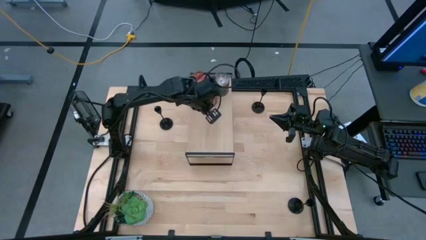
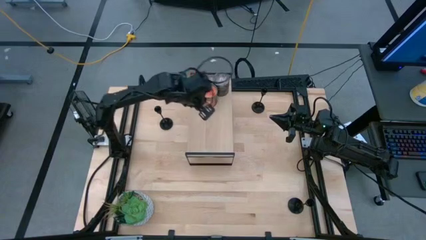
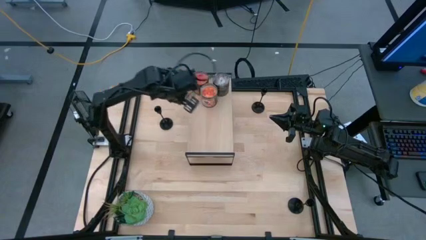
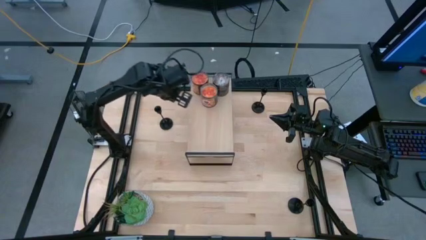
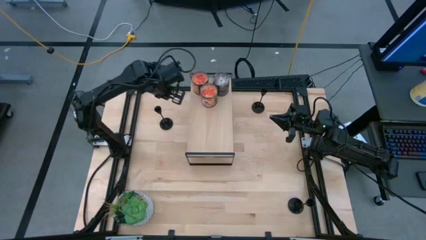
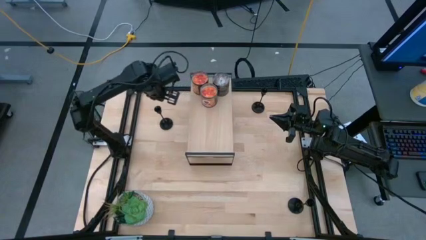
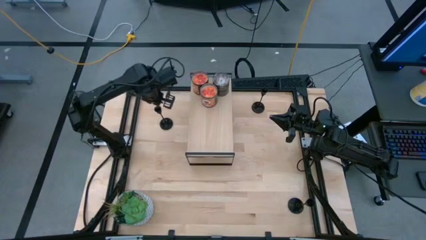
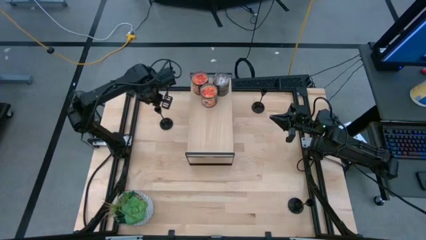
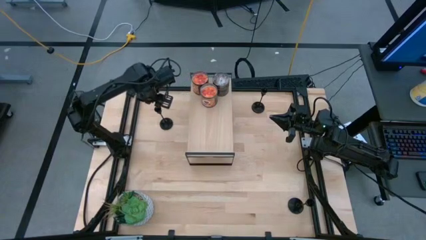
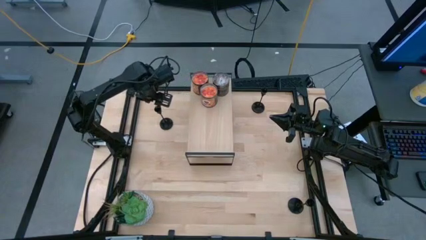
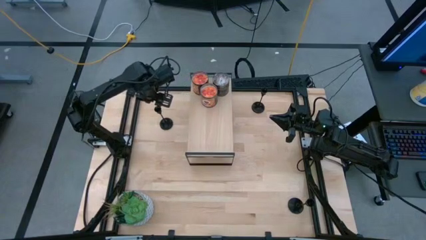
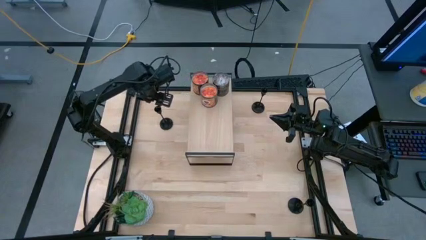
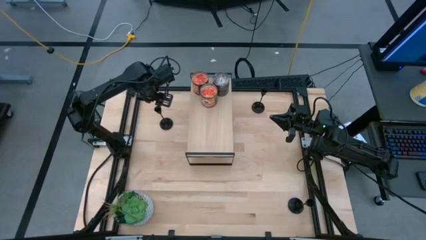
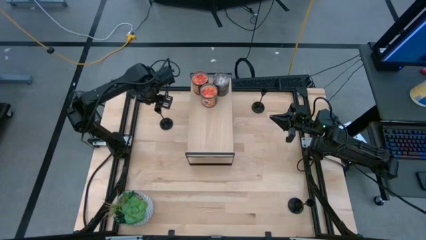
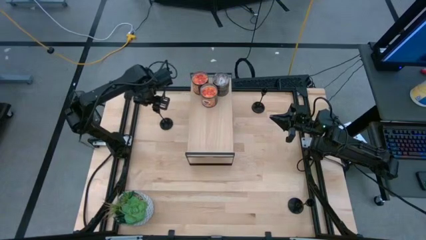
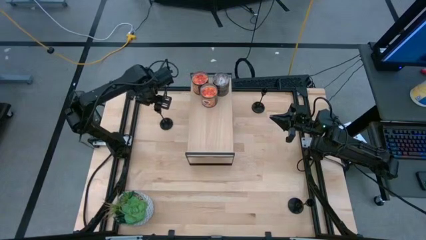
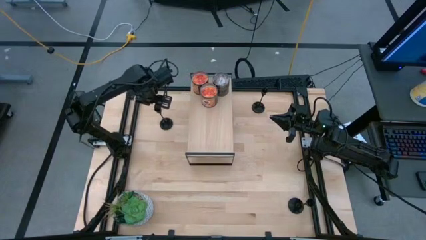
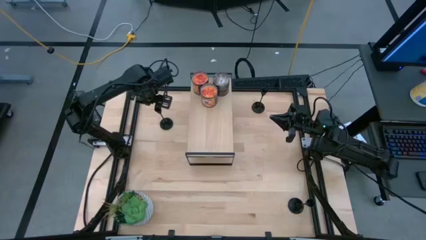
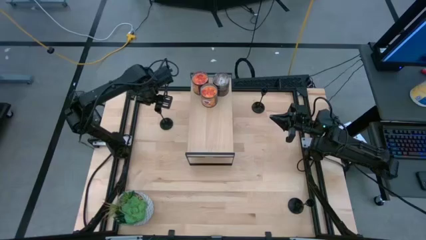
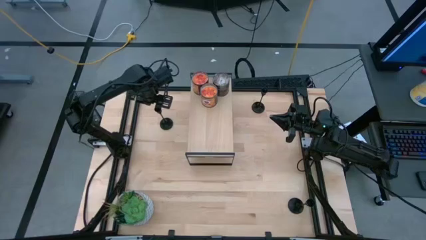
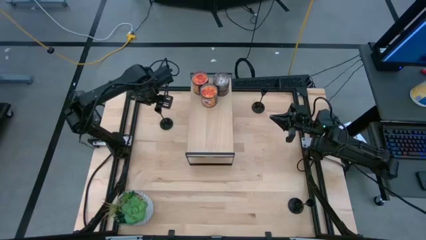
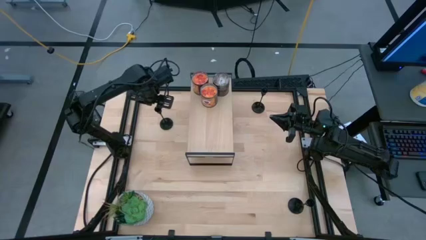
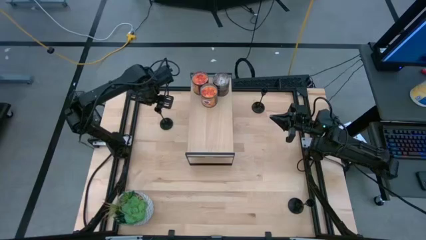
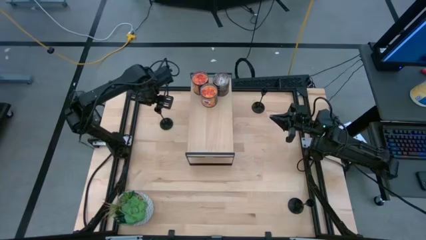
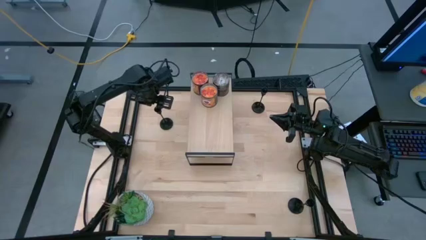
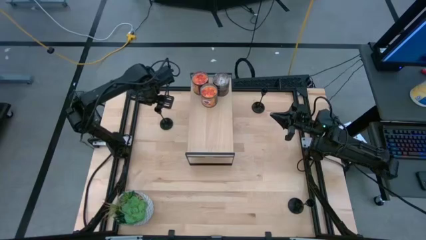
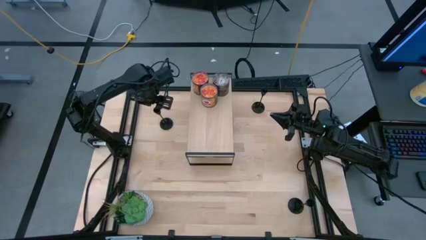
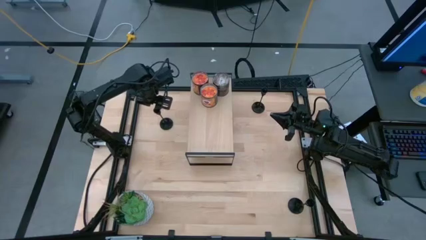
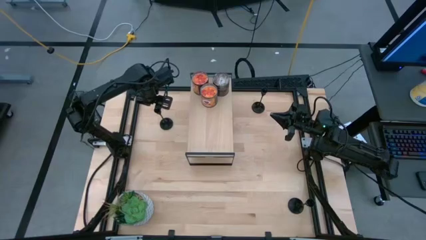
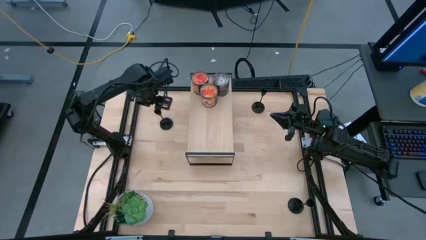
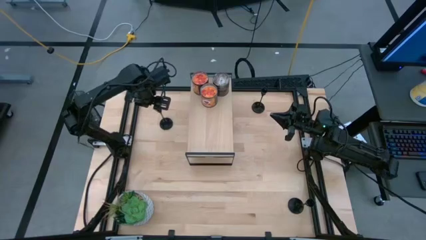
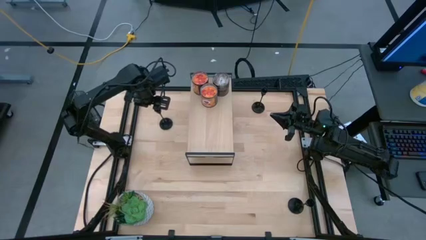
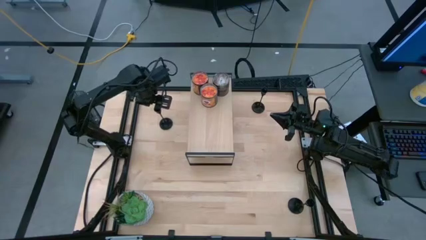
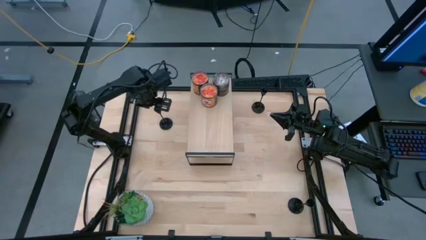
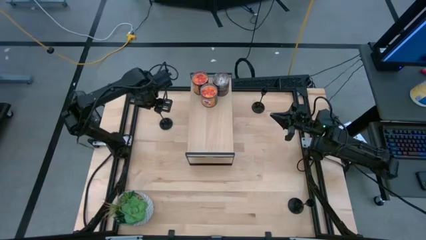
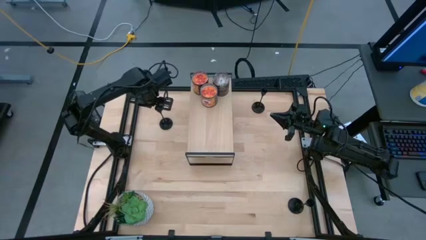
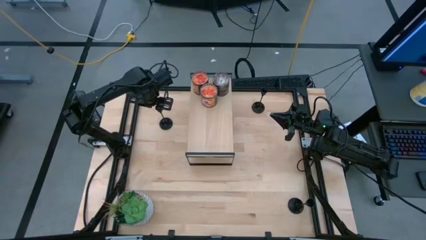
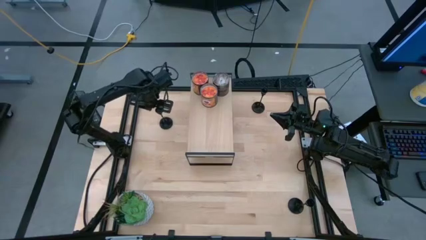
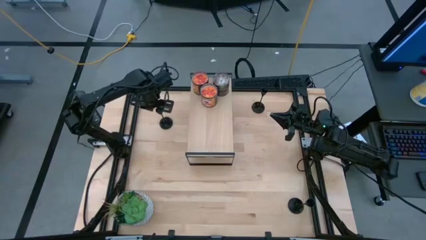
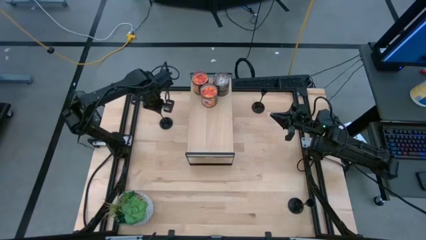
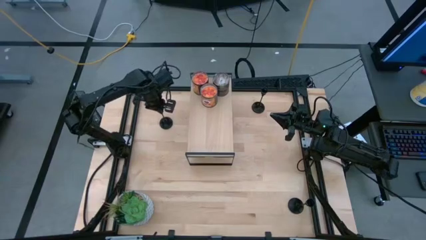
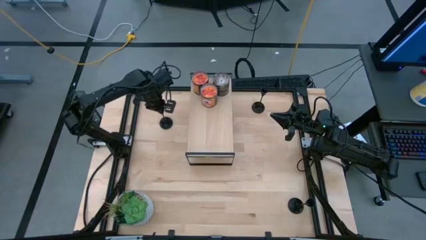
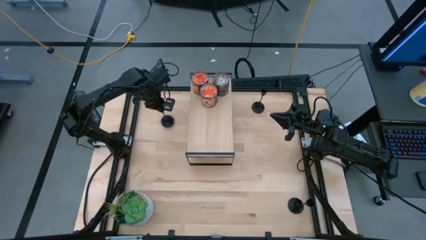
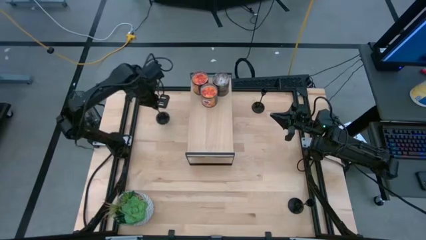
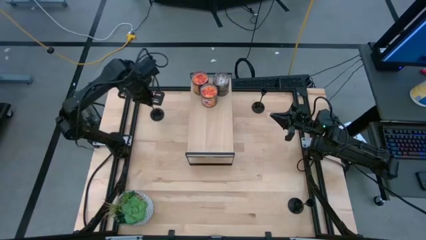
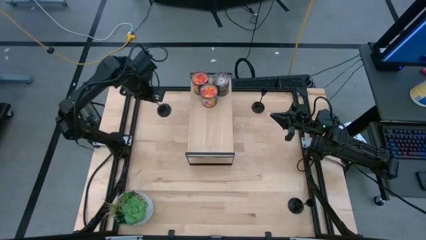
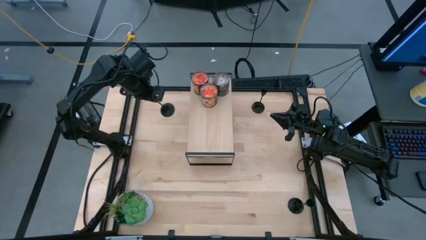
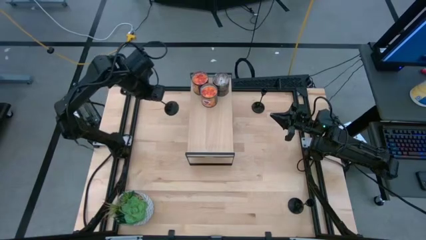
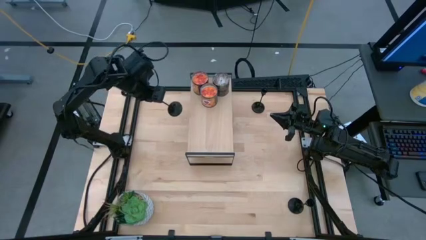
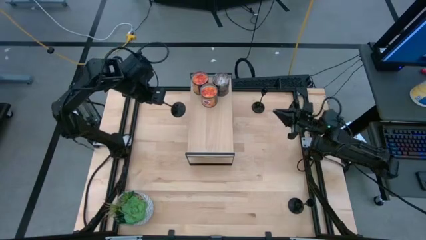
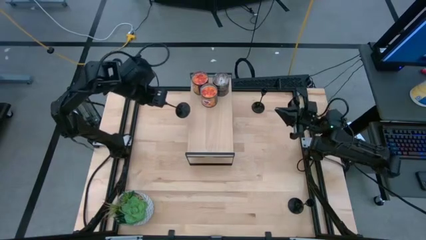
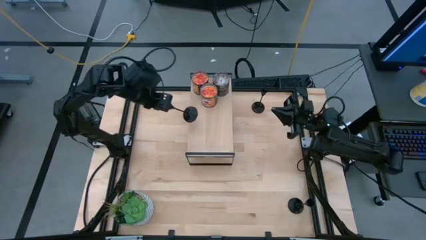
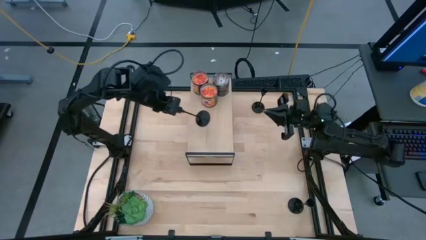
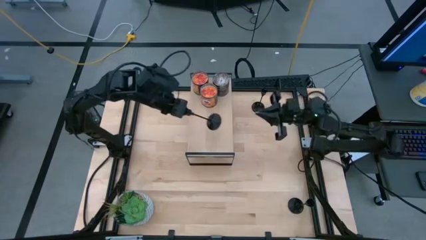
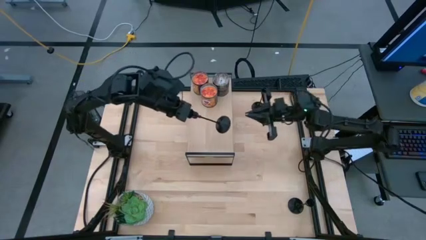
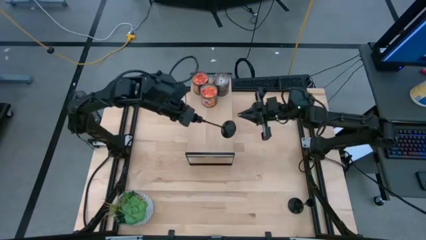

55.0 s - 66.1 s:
Task: Pick & Place candle stick holders
Put the left black candle holder on the shelf

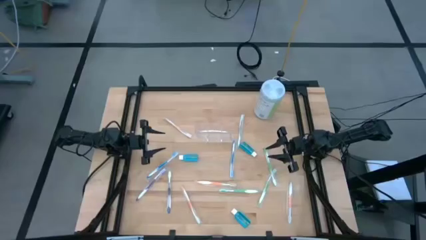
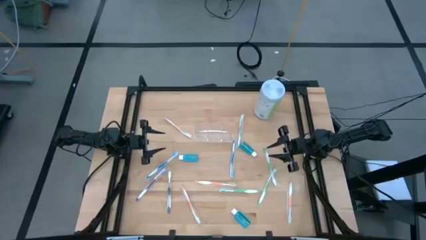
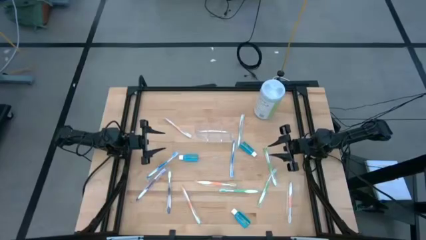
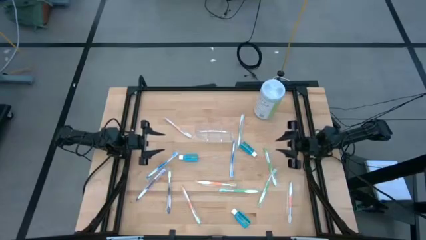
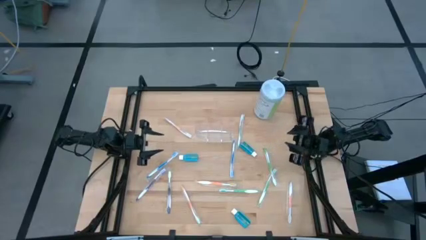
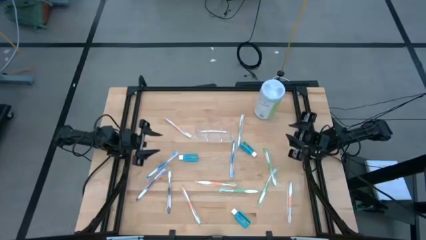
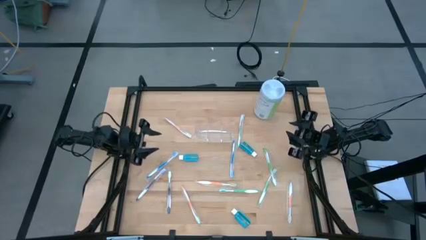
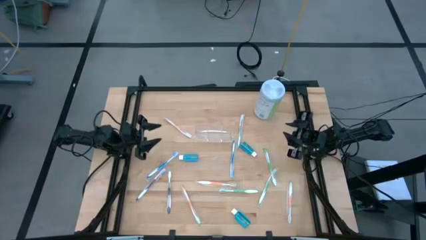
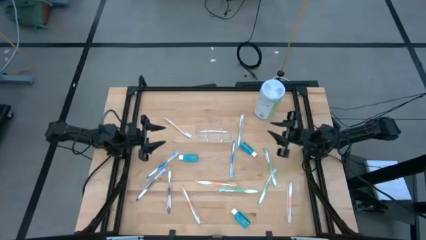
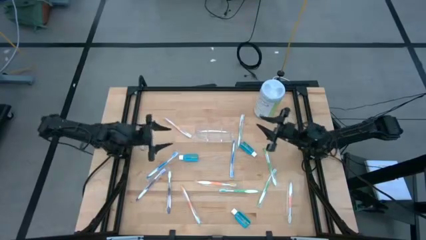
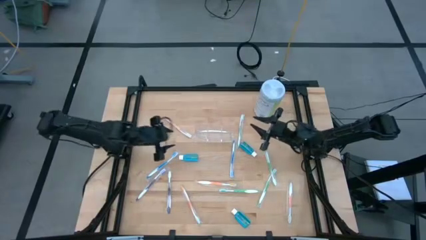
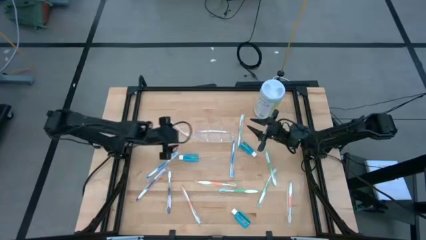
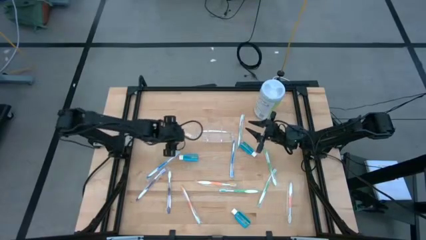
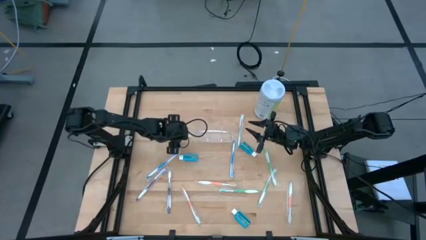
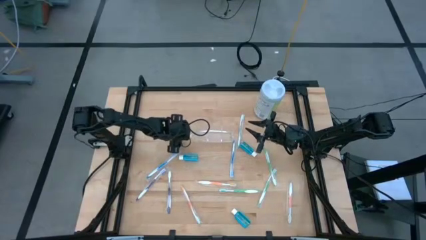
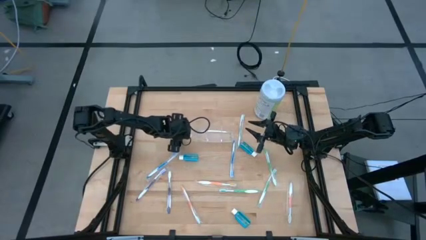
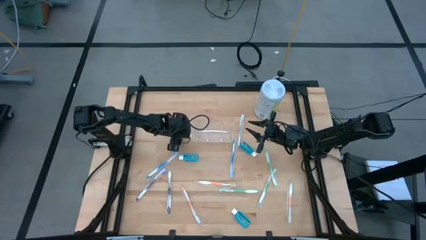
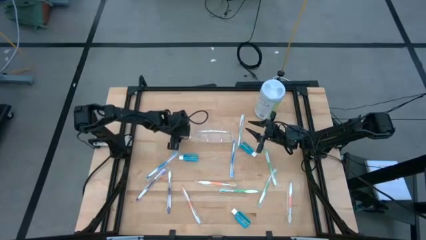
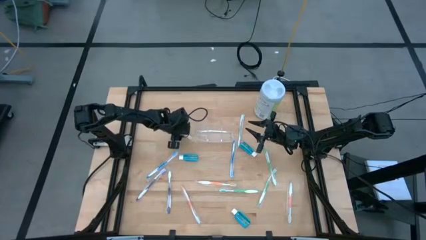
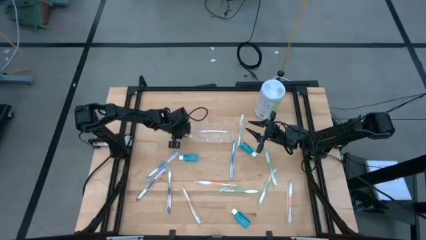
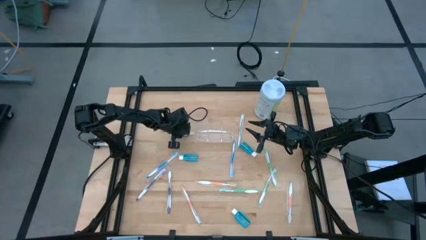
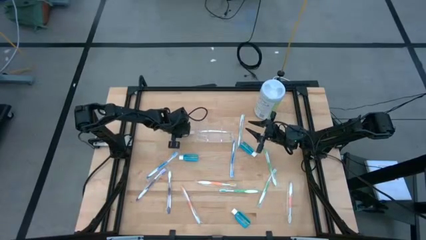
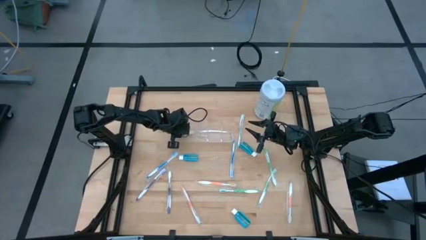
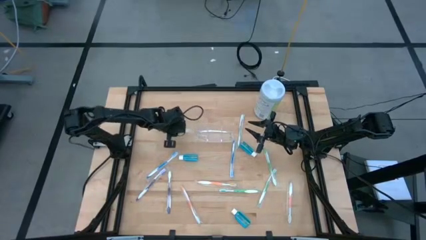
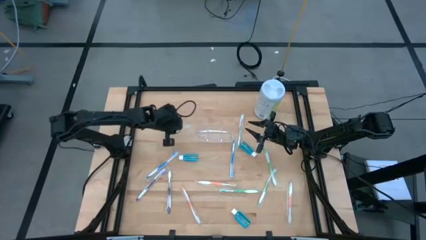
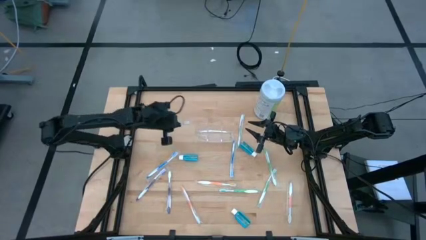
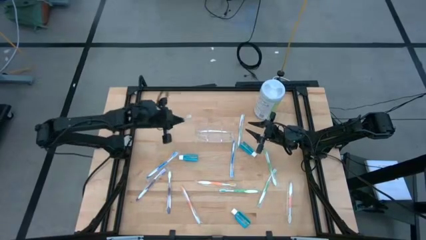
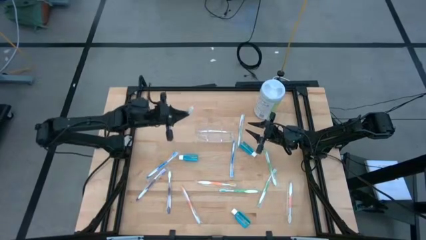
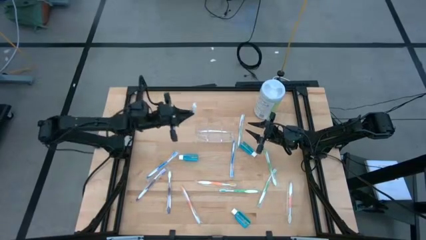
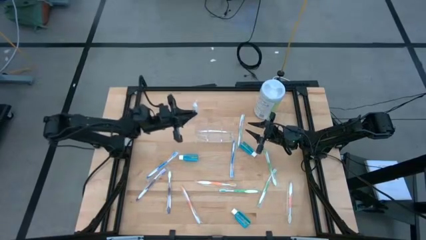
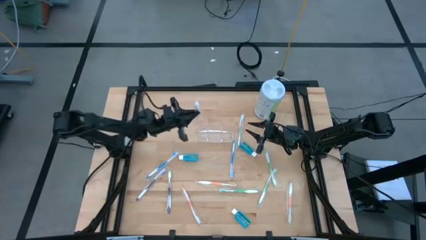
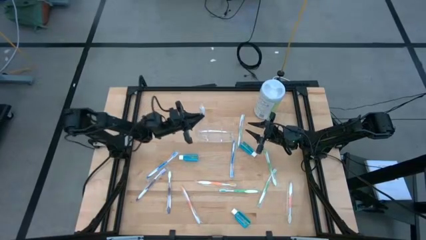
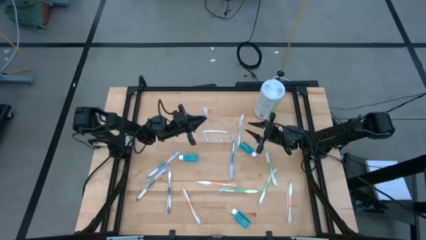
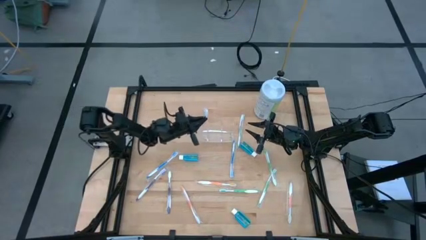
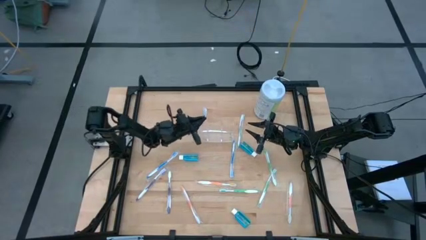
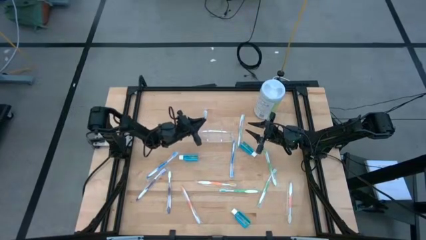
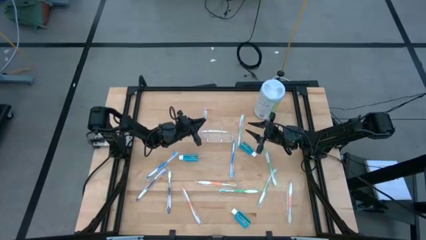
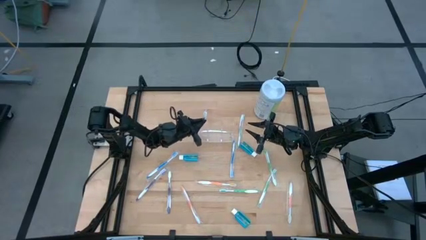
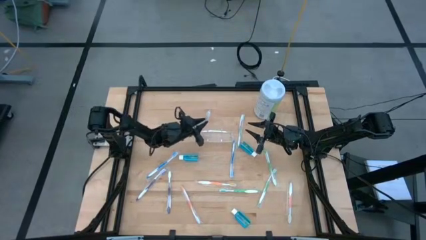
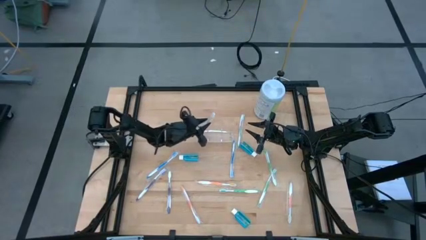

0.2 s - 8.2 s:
Task: Pick & Place toothbrushing station
Put the top left orange toothbrush into the transparent organizer
